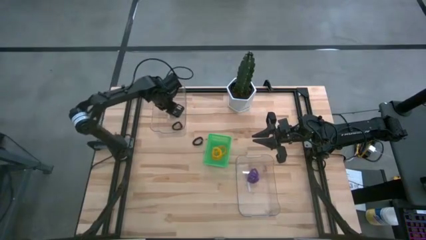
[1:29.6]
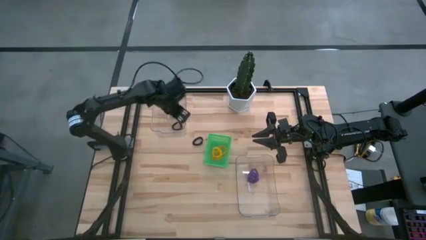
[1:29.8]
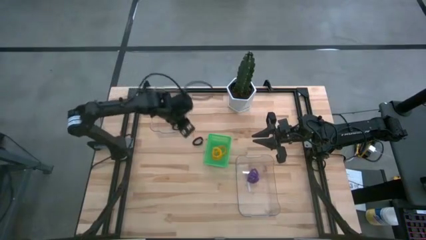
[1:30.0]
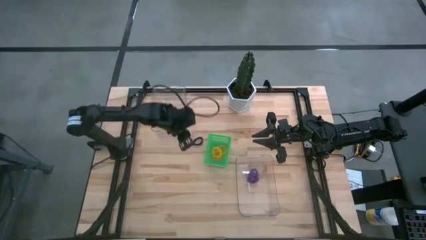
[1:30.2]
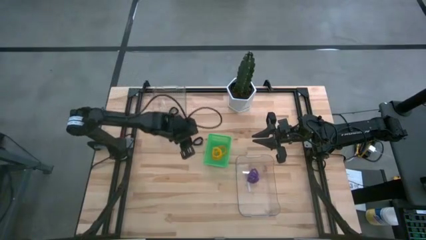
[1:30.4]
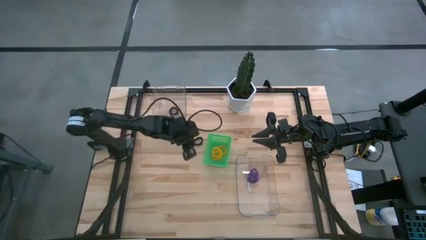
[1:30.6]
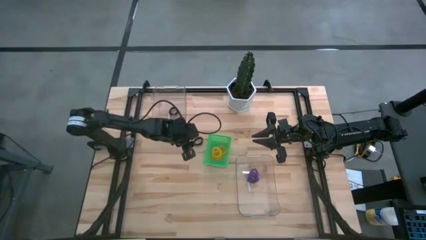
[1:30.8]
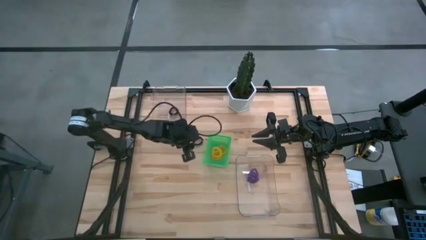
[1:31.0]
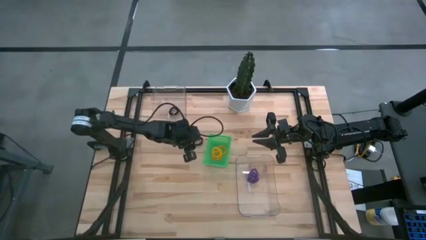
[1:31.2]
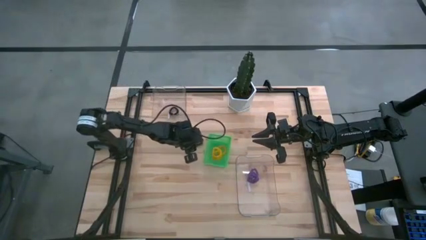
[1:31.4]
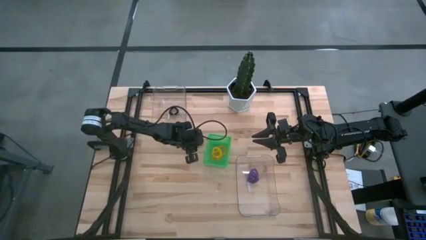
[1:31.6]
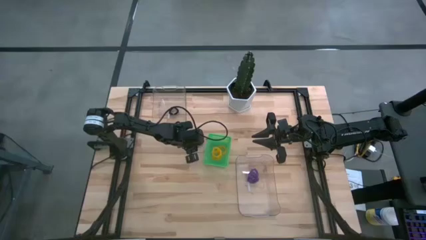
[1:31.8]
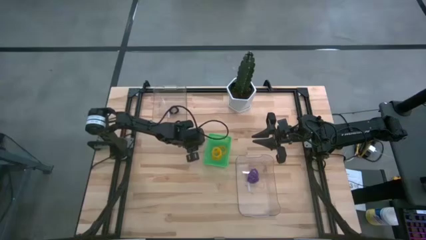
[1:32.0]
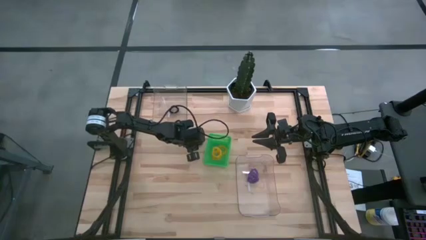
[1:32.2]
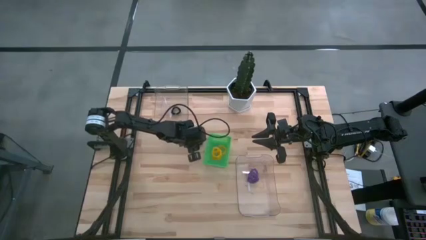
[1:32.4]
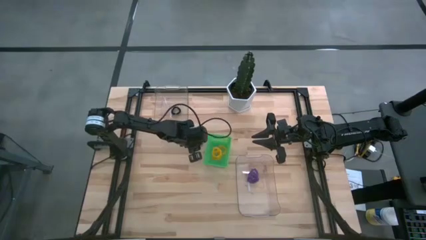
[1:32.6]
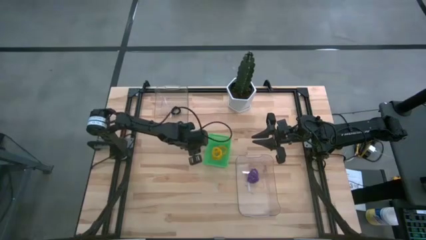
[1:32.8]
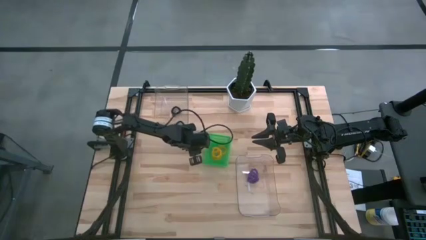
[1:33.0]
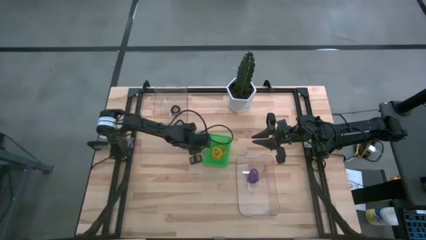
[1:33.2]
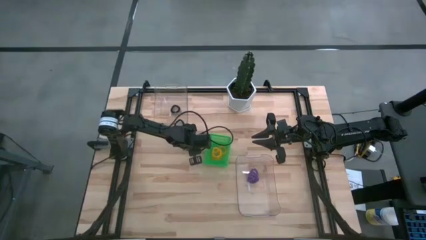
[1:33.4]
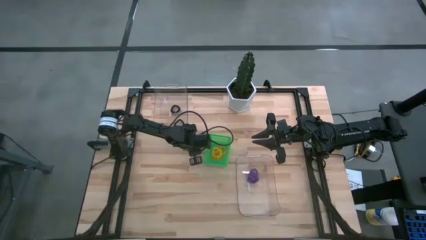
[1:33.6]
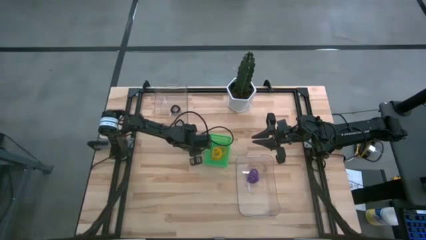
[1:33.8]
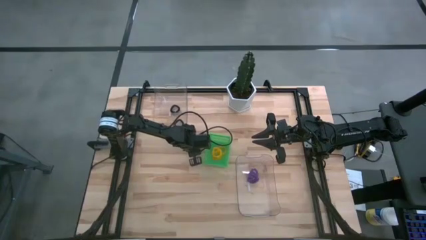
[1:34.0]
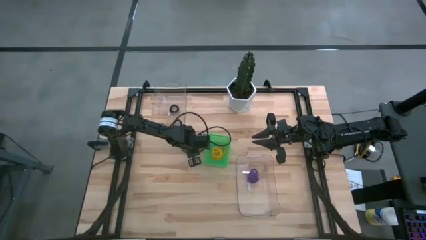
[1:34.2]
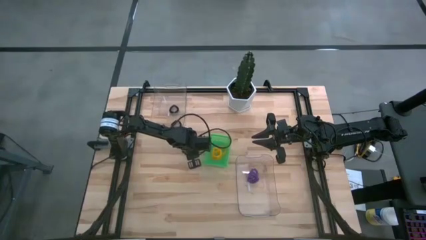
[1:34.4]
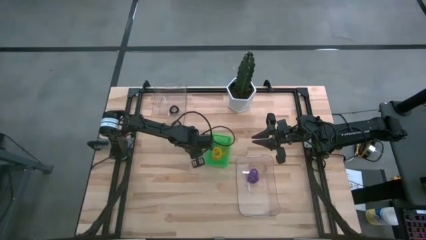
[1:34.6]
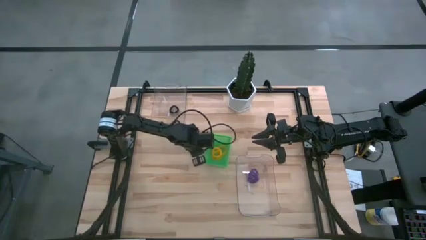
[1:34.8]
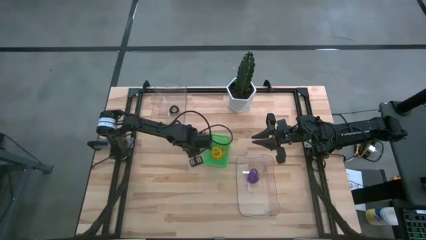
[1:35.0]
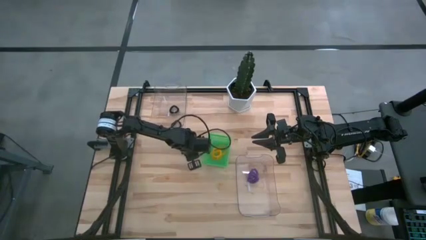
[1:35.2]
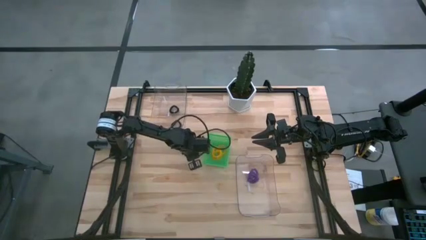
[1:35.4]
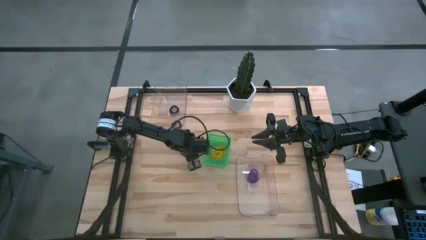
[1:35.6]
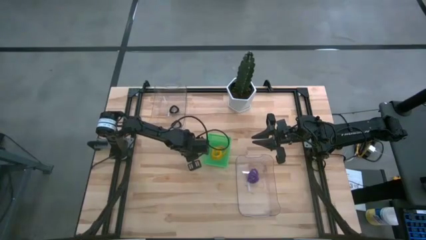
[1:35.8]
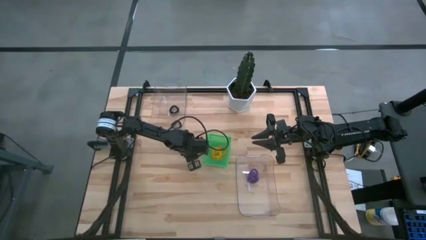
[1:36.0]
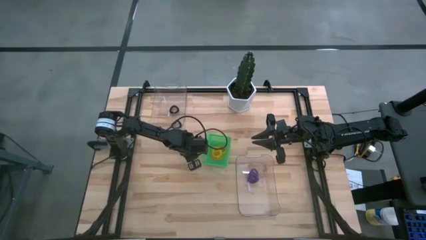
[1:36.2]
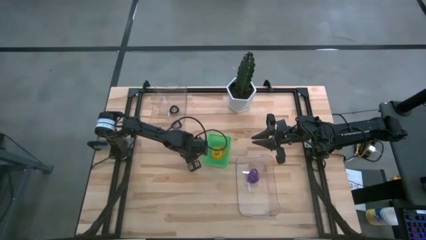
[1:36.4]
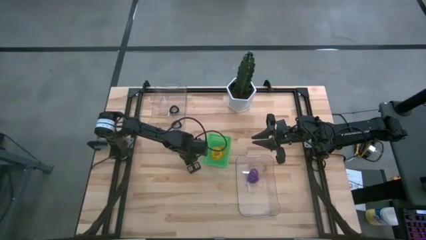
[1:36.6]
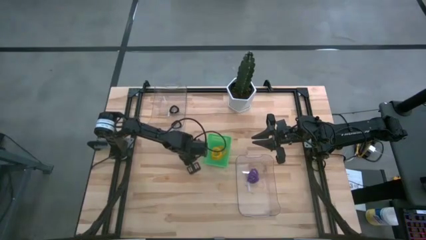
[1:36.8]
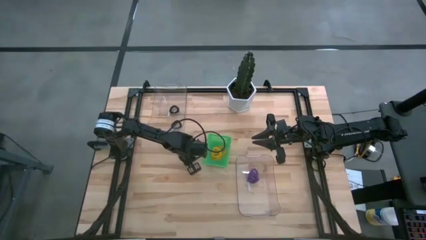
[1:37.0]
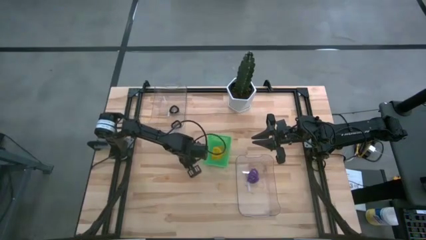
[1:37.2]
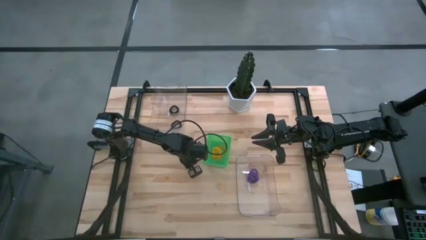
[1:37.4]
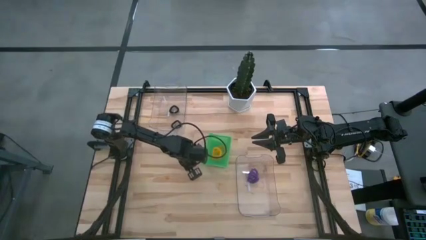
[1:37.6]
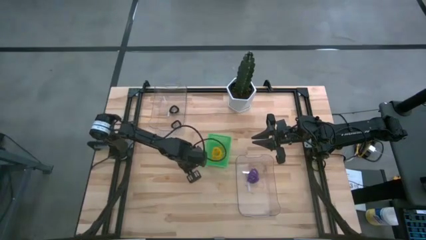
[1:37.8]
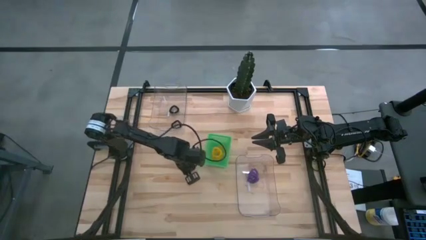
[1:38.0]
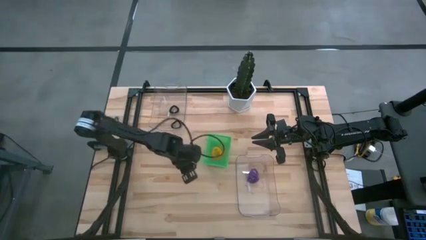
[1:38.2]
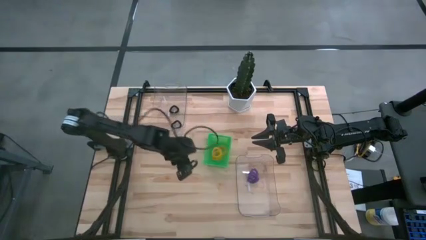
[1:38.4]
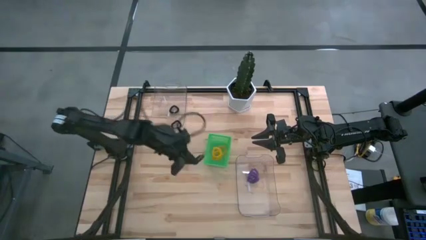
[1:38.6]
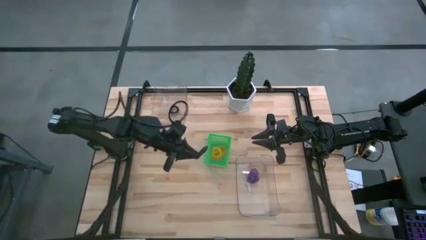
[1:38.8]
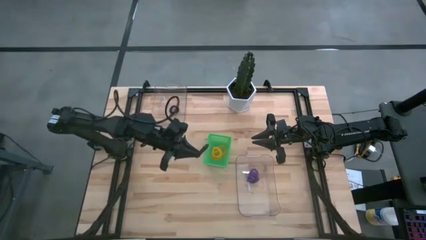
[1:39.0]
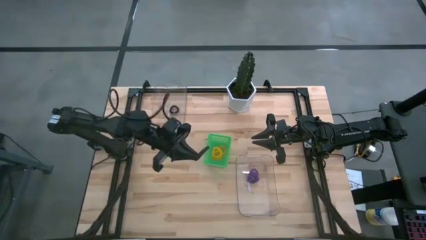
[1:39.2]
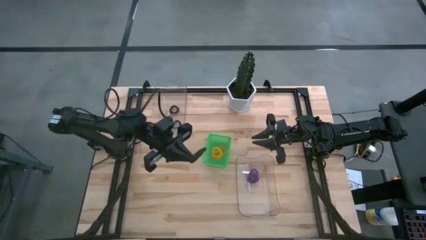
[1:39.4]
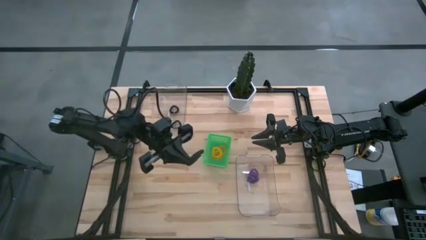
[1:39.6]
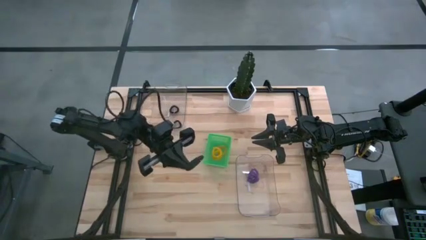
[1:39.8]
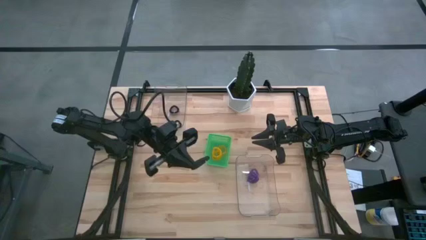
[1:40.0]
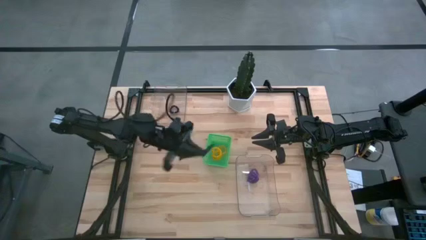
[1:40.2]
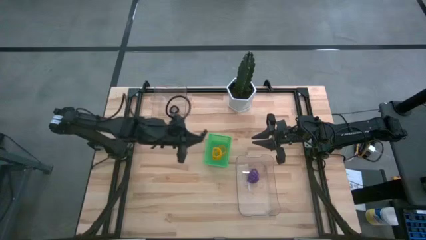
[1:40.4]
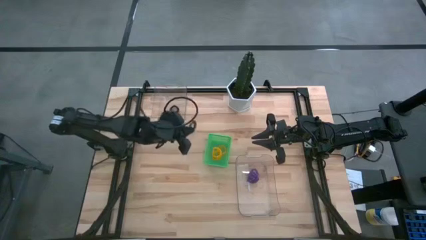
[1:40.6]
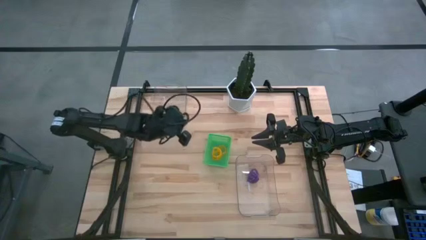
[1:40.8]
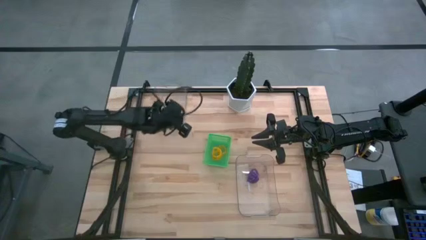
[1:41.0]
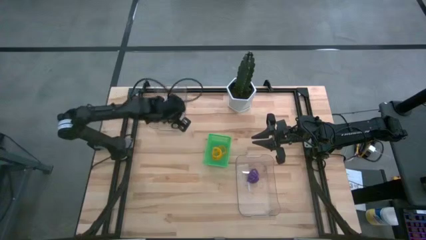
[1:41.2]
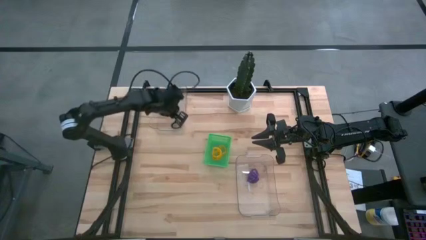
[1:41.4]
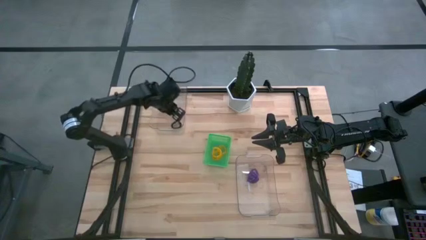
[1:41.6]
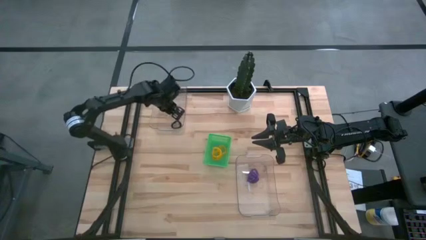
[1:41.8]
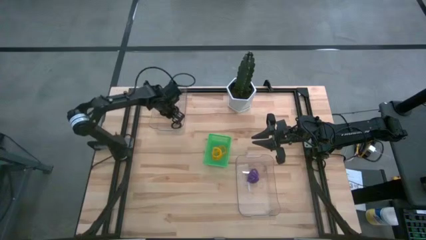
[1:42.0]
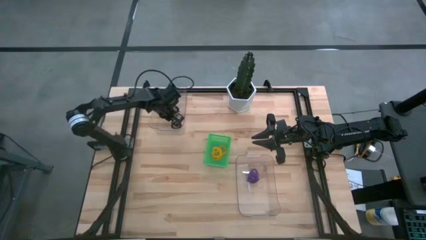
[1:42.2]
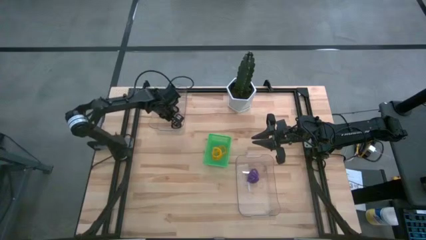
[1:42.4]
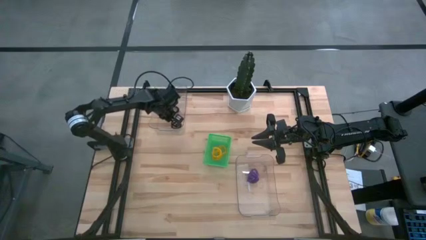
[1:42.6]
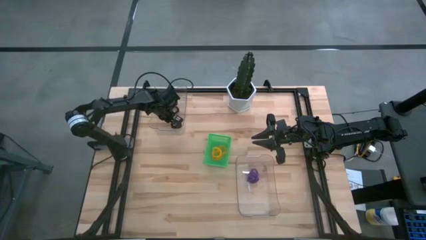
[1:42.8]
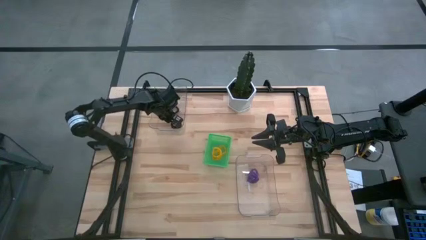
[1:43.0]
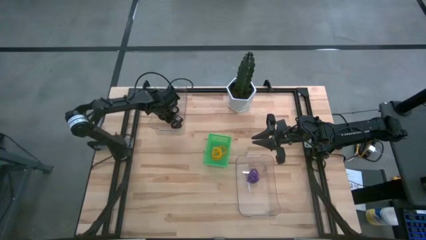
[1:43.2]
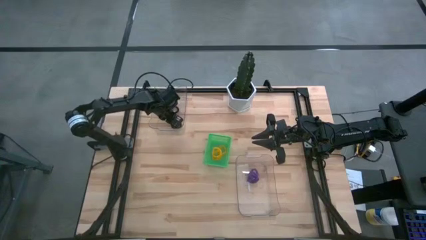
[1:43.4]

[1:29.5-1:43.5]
Task: Sort spring keychains
Put the black spring keychain into the left transparent bin
